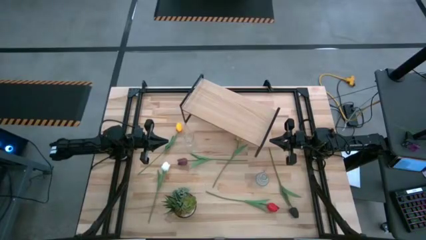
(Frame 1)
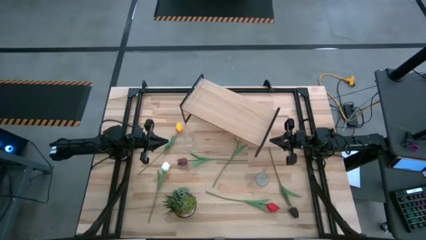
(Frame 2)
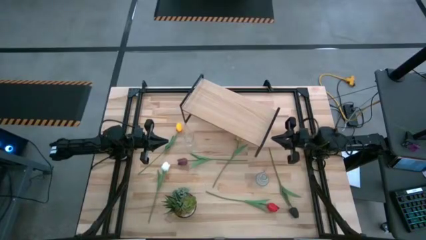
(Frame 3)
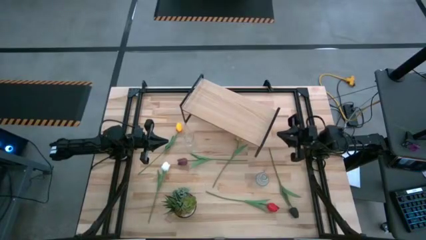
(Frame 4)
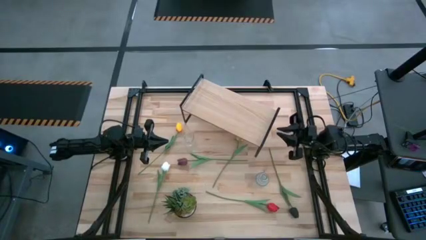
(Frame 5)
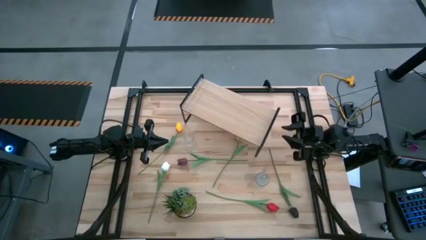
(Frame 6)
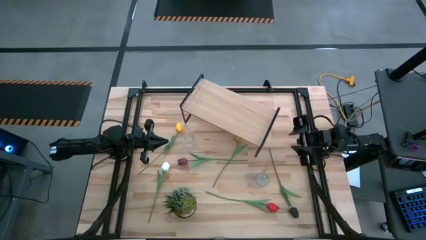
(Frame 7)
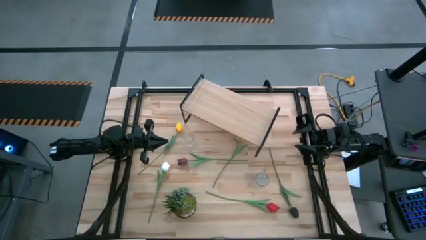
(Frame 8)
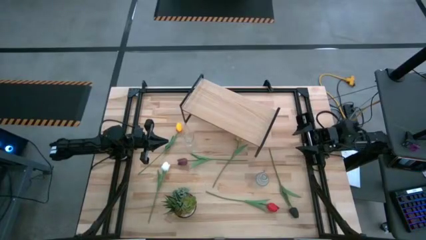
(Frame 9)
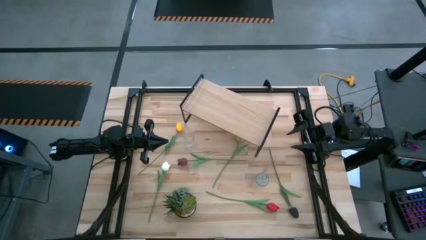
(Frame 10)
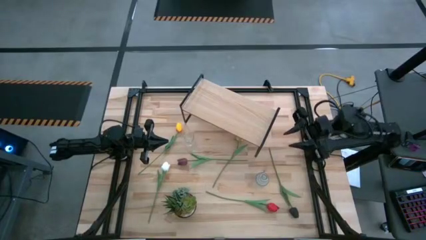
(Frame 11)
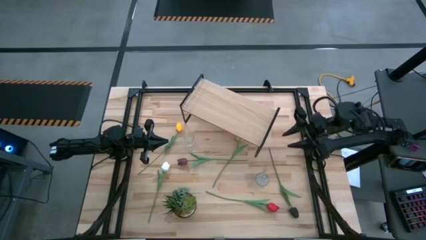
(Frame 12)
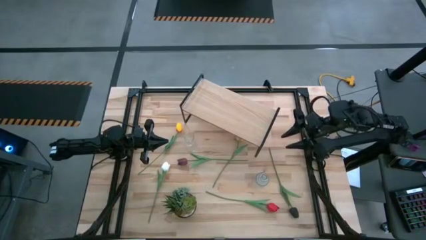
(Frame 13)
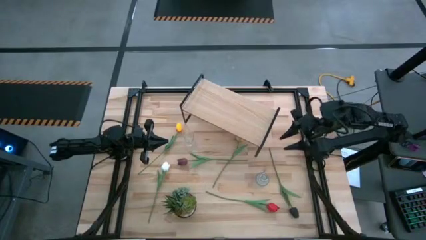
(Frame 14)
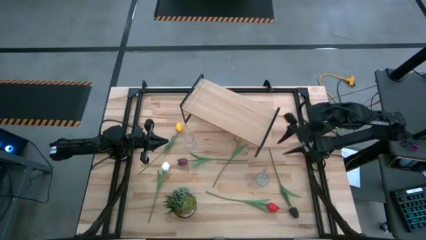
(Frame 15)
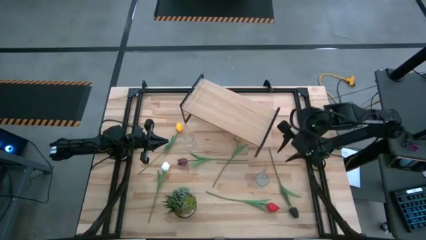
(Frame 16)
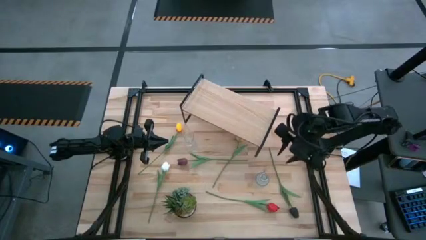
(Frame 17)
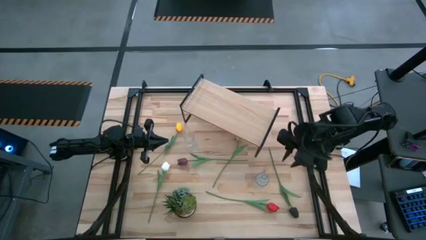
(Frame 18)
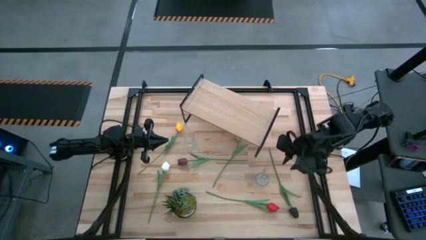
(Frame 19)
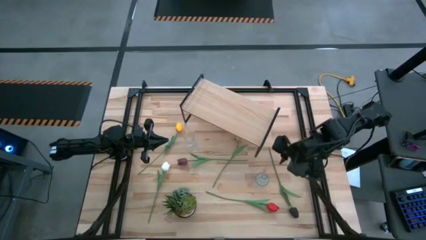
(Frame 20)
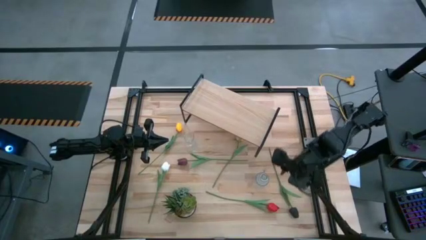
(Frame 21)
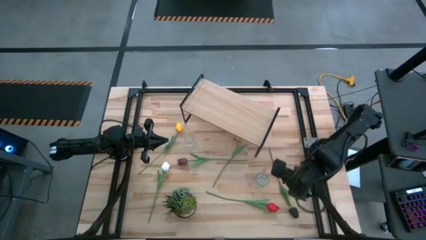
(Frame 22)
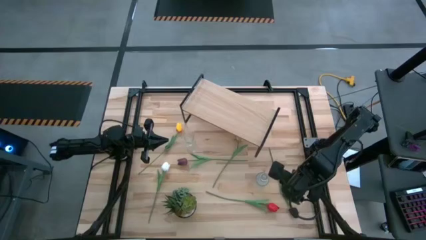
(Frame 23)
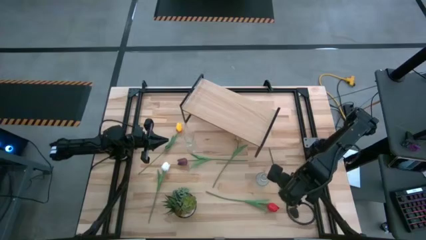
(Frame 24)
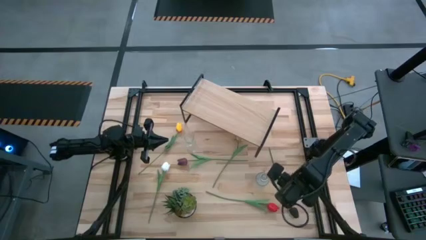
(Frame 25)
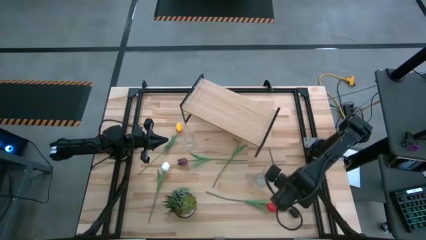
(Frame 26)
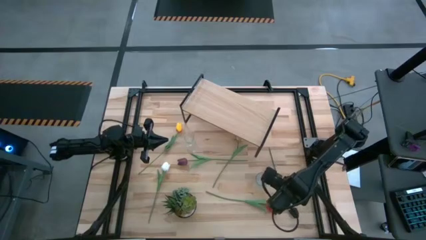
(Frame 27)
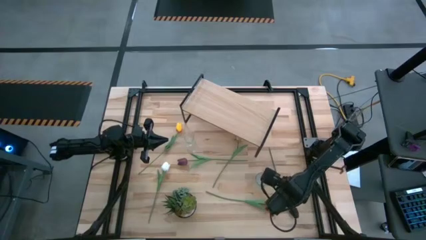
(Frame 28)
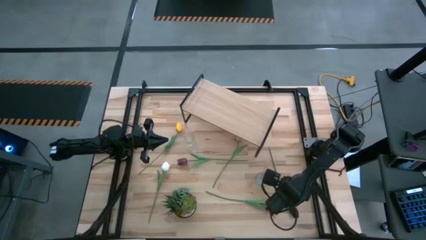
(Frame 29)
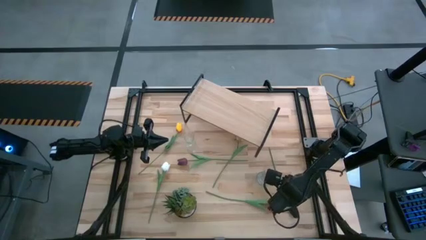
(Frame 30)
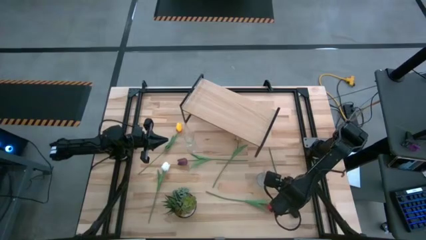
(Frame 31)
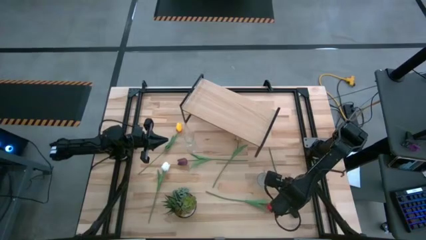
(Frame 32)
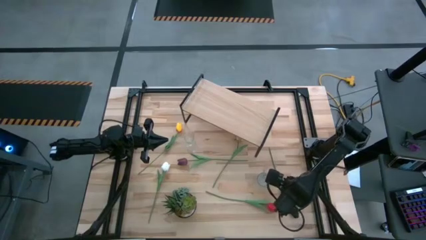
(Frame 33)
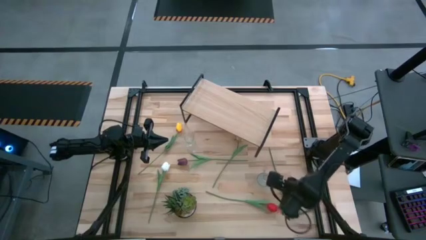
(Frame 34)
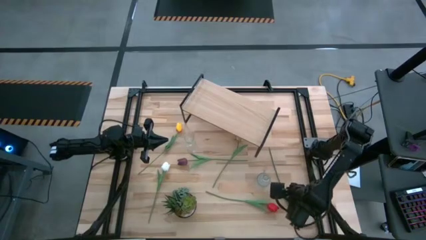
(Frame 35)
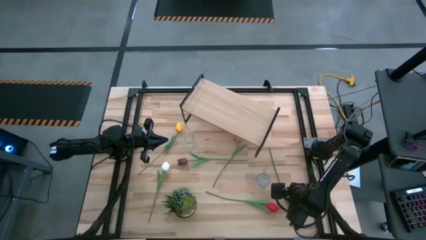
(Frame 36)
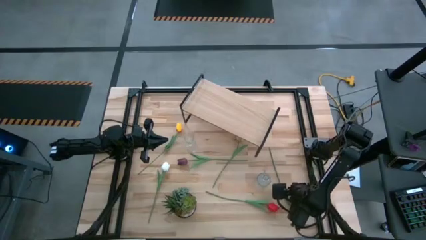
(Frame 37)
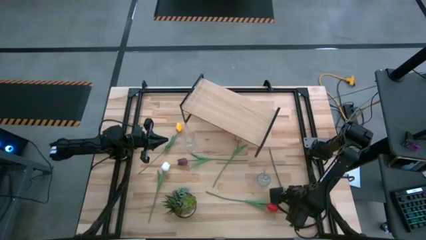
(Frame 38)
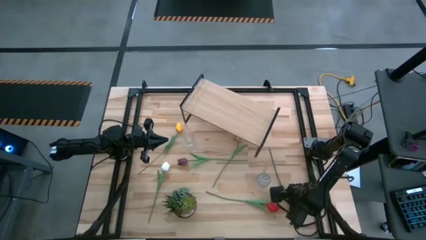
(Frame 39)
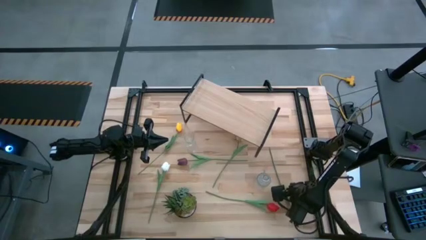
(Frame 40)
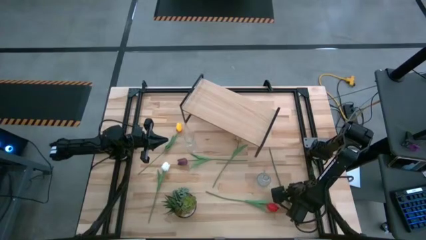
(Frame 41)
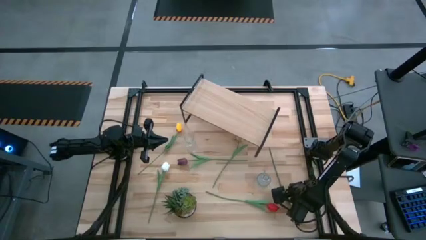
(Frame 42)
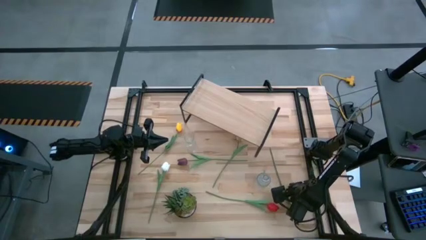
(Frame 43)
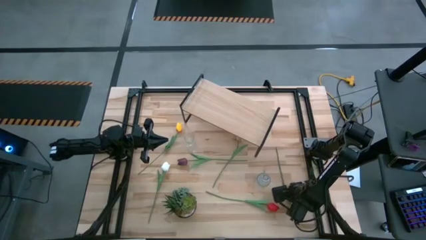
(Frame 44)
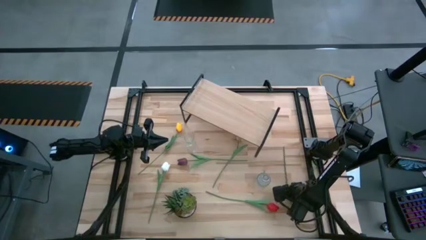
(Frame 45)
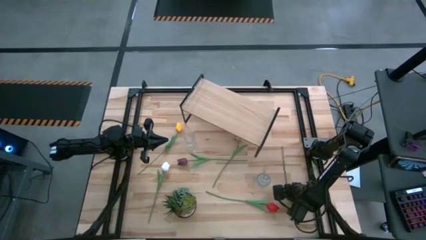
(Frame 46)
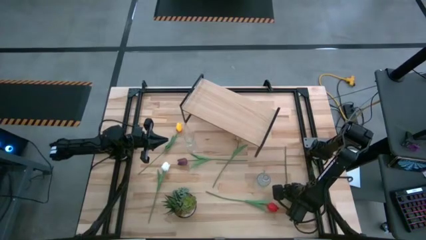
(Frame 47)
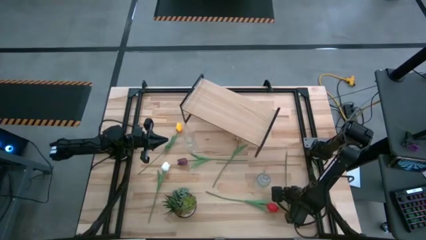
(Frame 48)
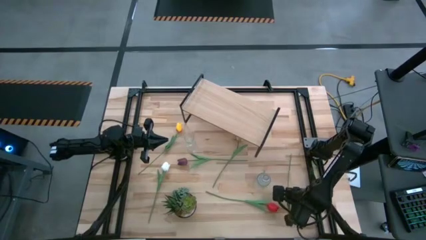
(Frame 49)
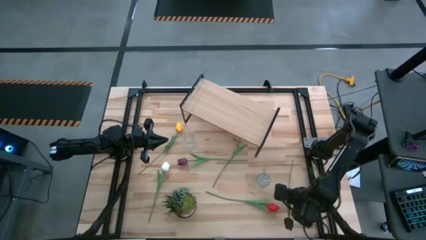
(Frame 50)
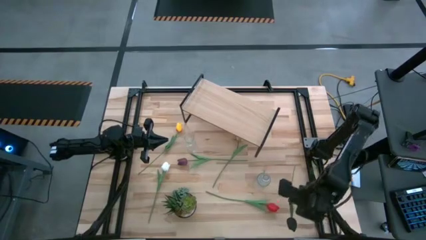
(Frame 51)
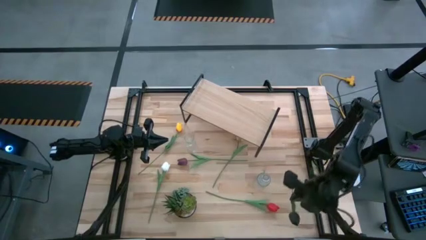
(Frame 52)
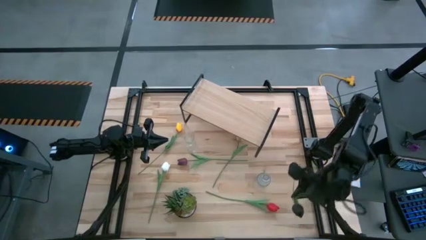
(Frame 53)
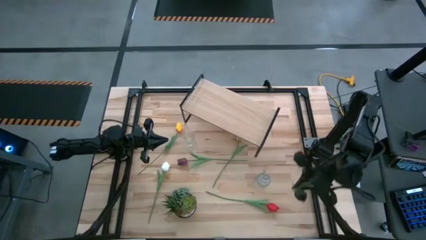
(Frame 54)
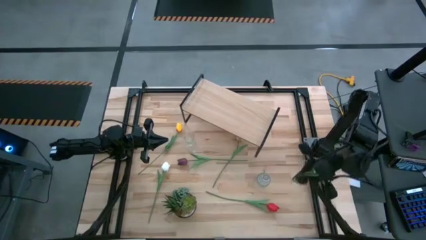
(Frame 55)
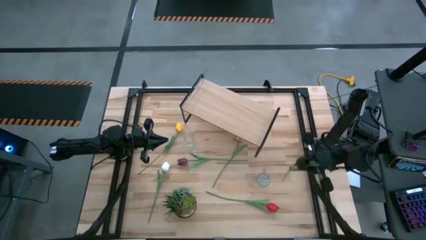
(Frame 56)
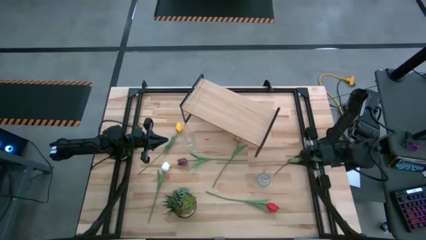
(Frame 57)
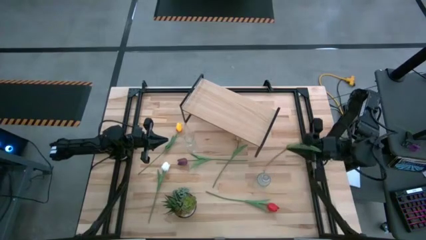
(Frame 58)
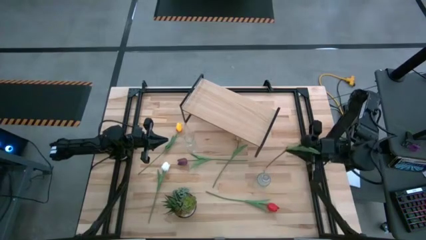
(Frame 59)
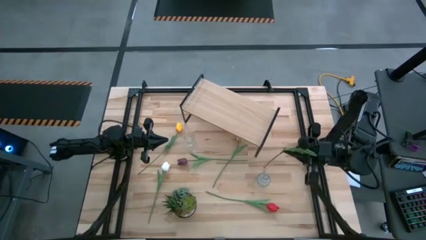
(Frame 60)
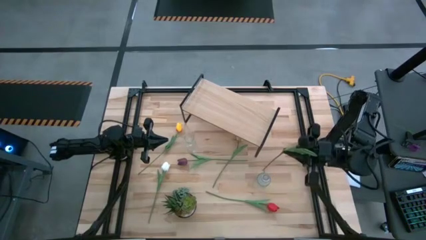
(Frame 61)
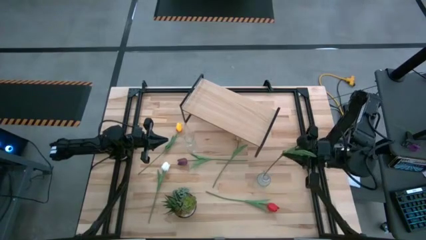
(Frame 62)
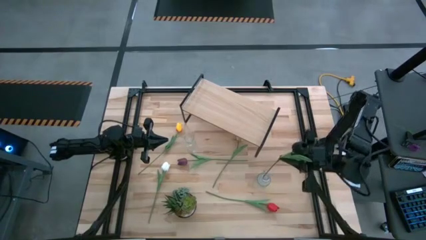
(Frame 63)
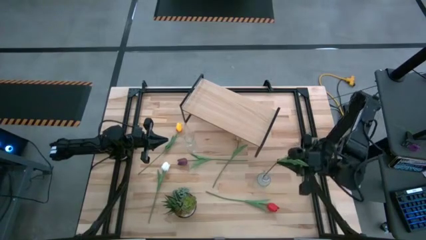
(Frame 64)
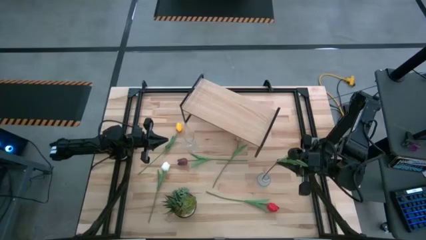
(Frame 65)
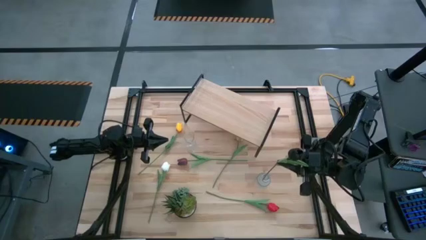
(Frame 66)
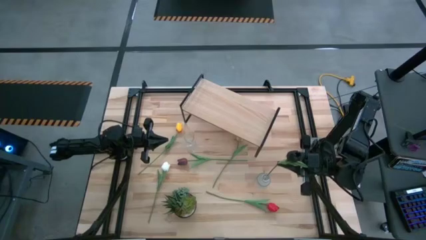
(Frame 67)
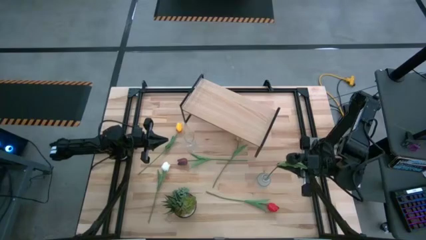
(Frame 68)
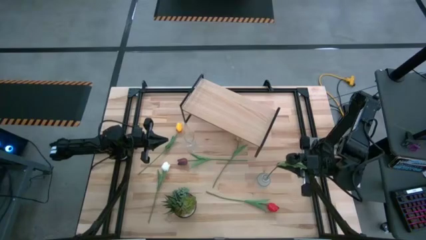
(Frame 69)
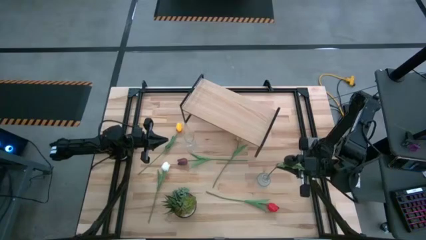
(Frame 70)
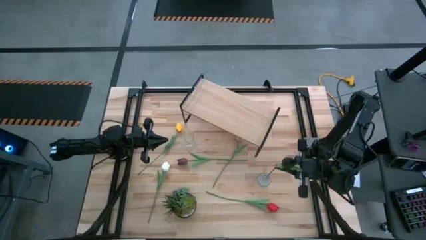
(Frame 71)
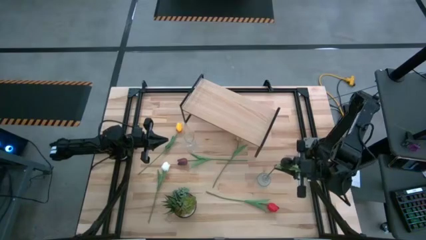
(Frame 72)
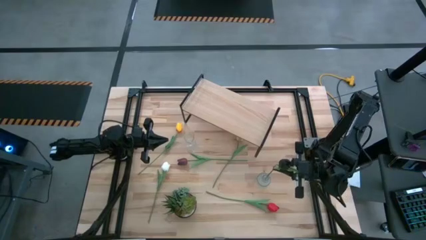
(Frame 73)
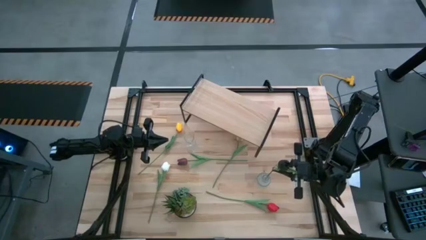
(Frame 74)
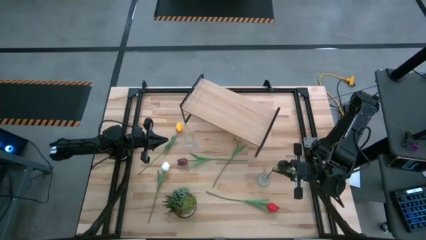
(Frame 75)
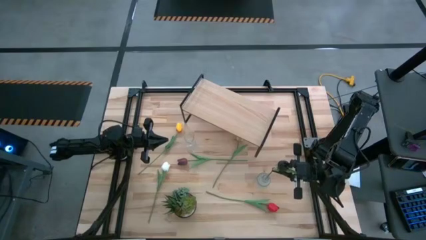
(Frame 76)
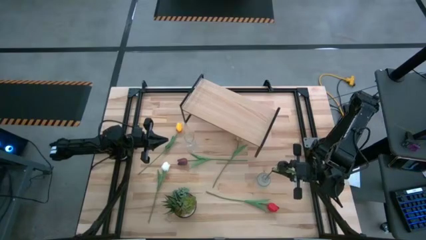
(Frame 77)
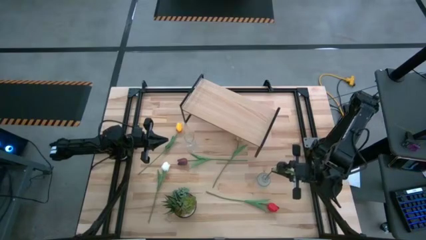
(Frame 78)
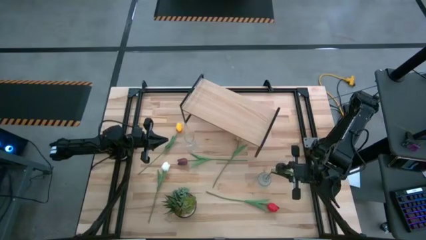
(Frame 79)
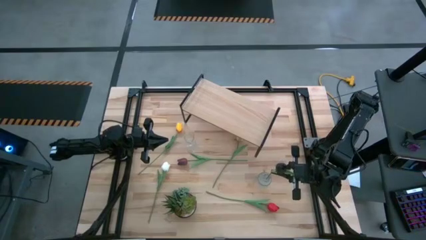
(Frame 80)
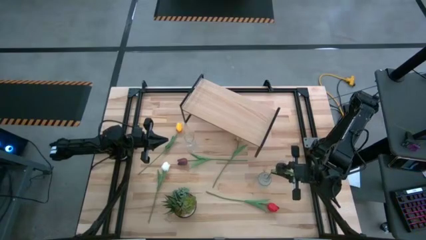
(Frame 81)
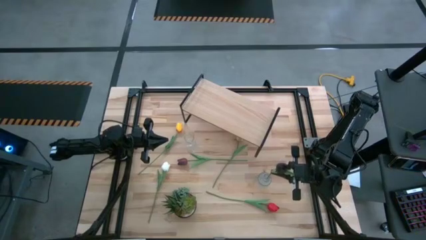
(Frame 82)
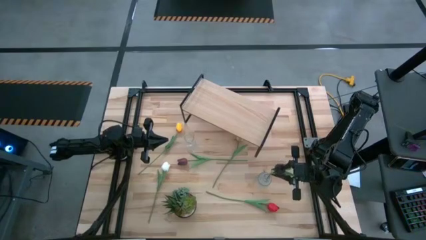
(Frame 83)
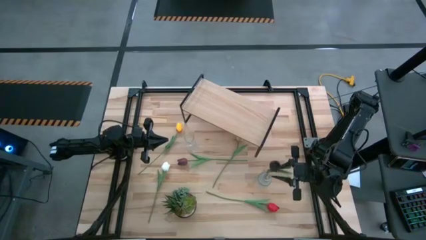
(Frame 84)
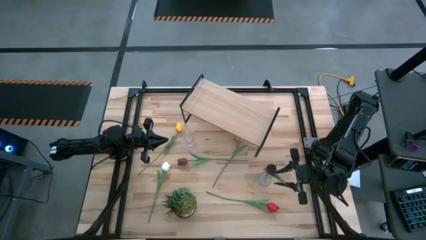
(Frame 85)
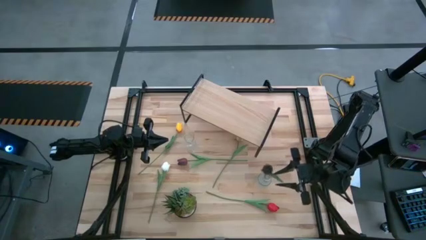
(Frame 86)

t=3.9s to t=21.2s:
Task: Pick and place flowers into a vace then onto a shelf
Put the black tulip into the right transparent vase
